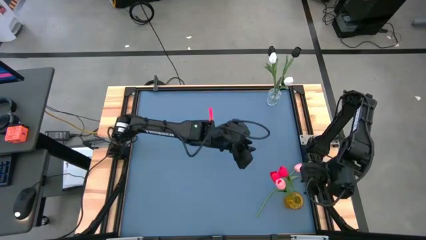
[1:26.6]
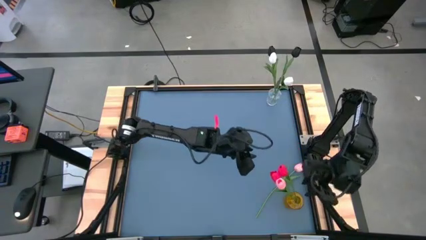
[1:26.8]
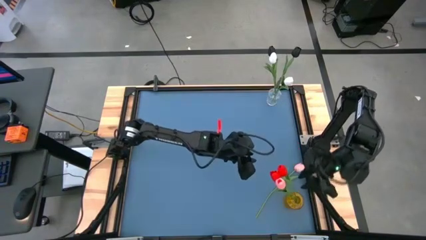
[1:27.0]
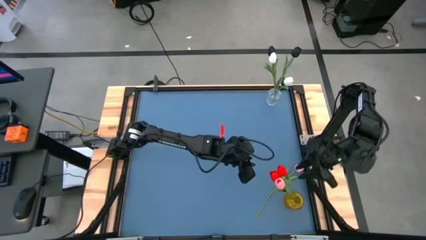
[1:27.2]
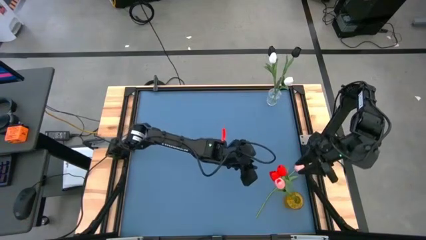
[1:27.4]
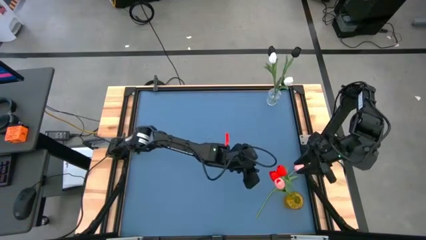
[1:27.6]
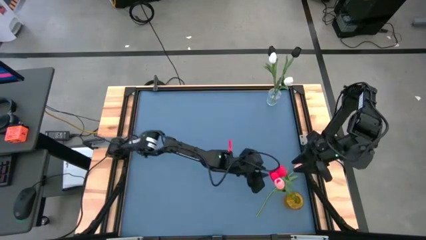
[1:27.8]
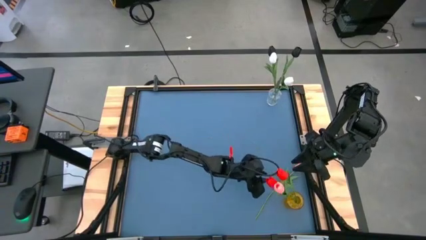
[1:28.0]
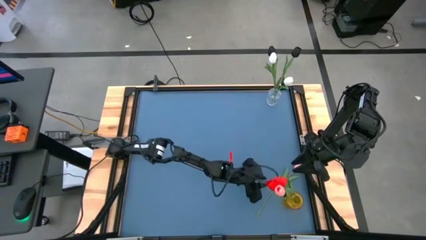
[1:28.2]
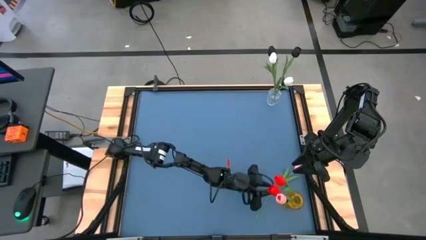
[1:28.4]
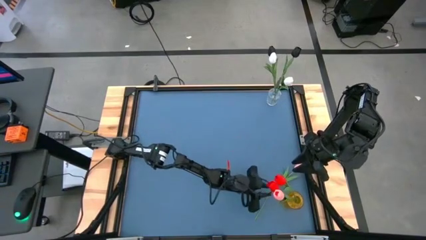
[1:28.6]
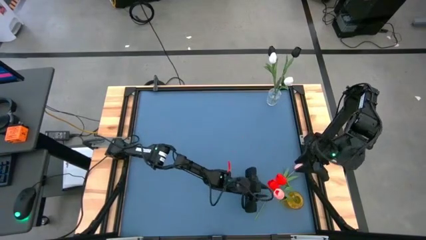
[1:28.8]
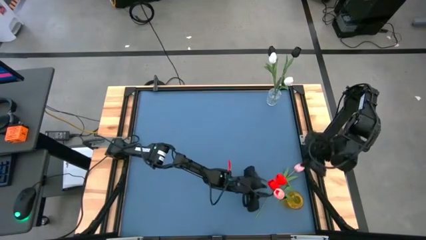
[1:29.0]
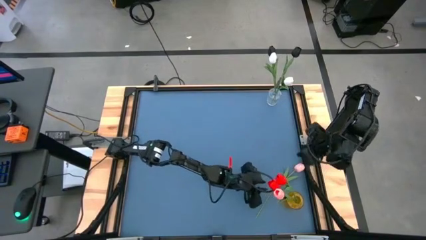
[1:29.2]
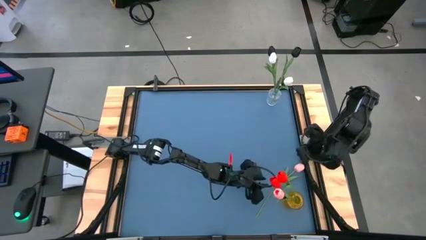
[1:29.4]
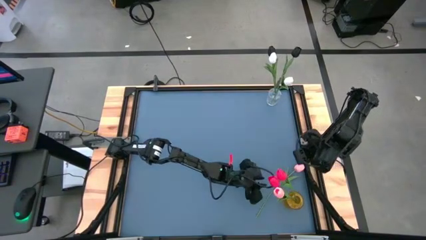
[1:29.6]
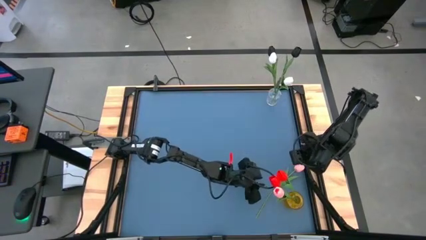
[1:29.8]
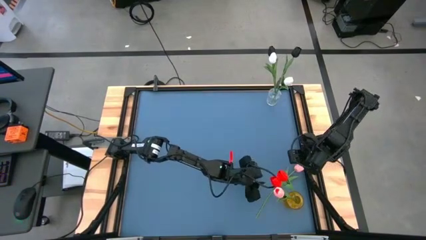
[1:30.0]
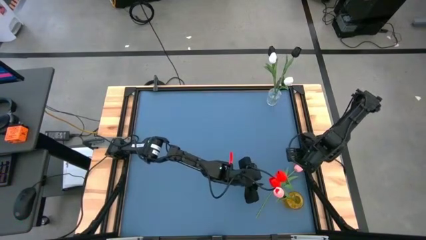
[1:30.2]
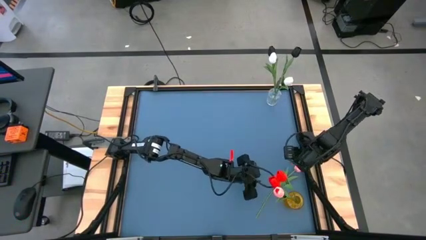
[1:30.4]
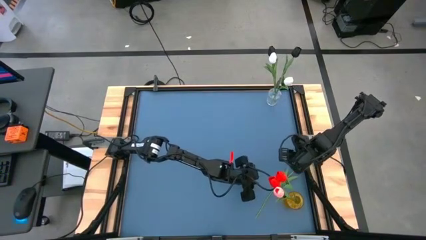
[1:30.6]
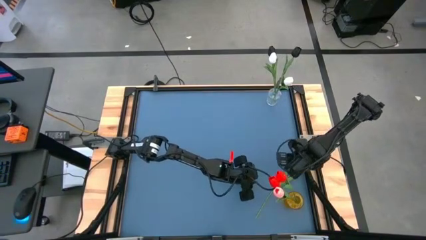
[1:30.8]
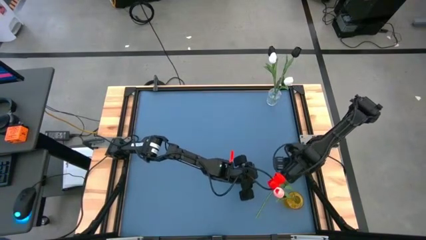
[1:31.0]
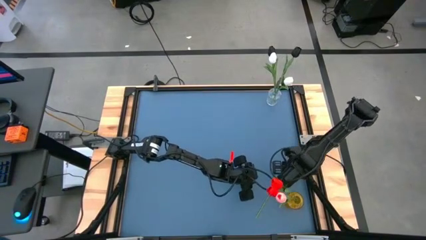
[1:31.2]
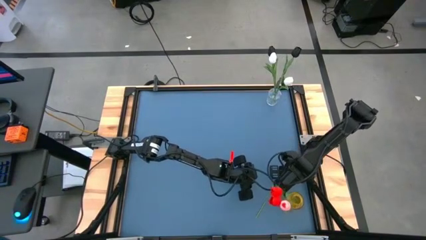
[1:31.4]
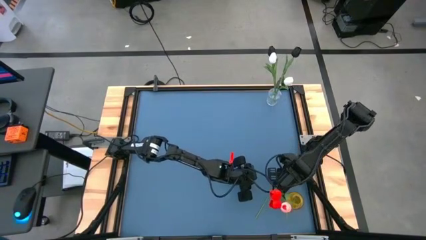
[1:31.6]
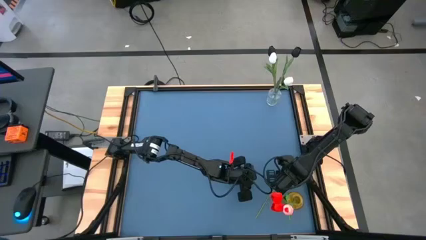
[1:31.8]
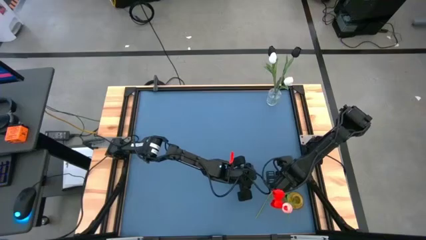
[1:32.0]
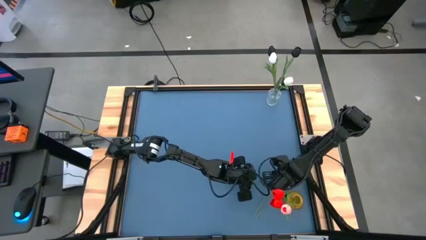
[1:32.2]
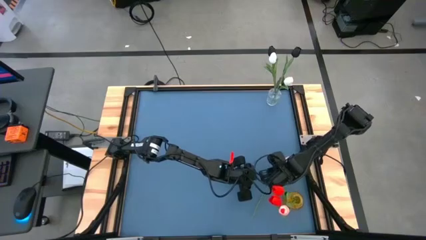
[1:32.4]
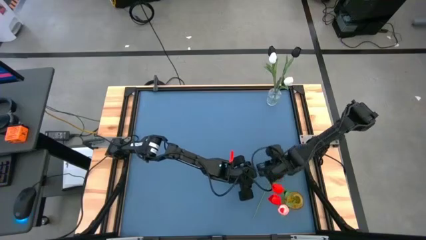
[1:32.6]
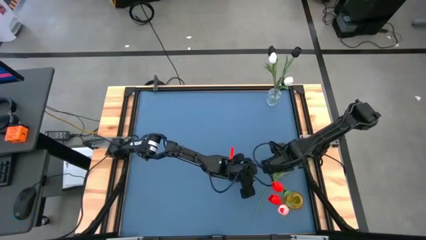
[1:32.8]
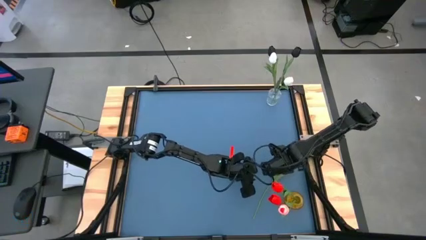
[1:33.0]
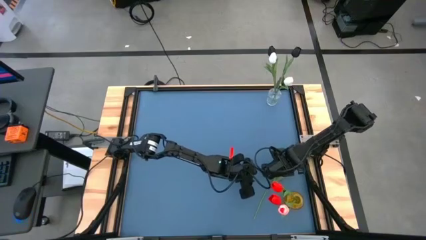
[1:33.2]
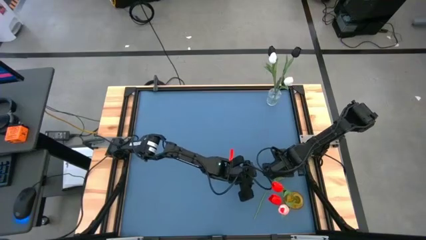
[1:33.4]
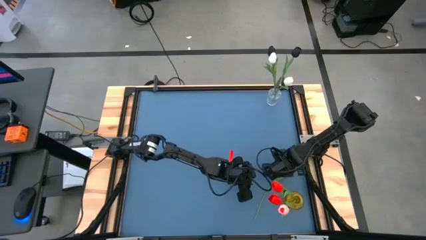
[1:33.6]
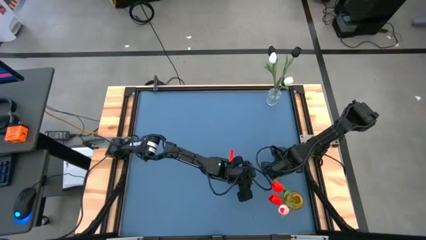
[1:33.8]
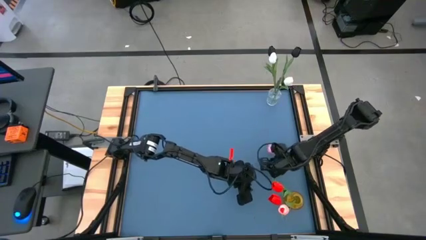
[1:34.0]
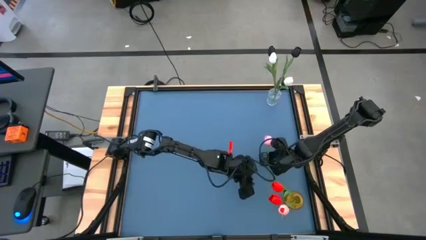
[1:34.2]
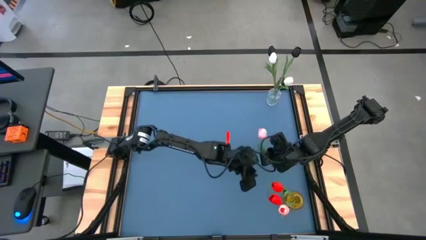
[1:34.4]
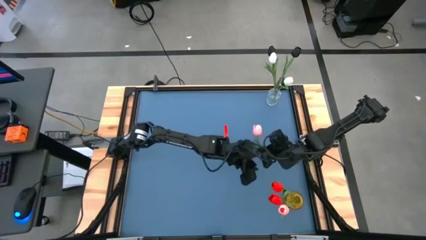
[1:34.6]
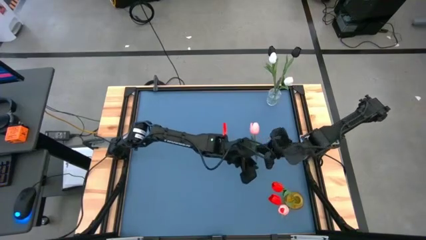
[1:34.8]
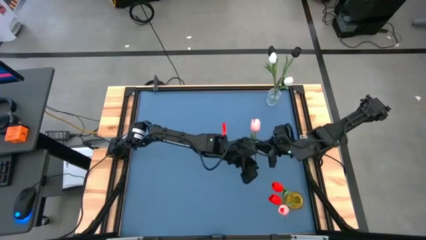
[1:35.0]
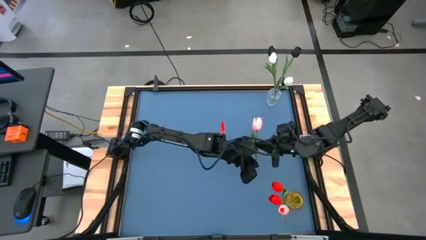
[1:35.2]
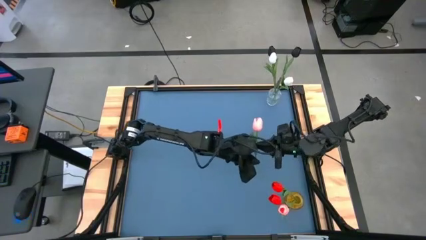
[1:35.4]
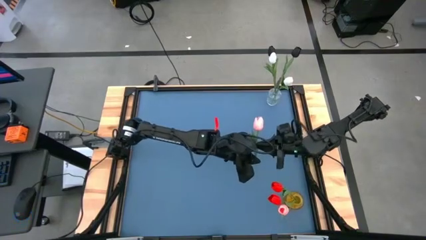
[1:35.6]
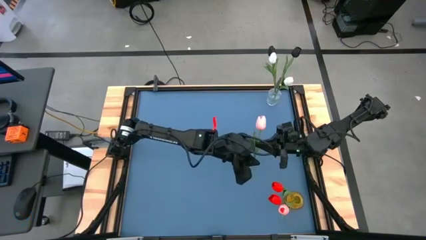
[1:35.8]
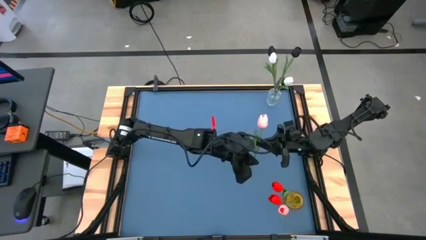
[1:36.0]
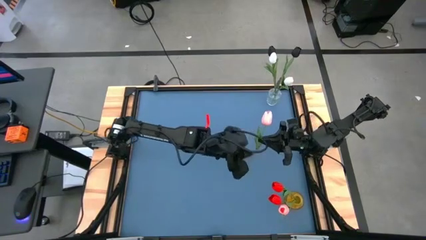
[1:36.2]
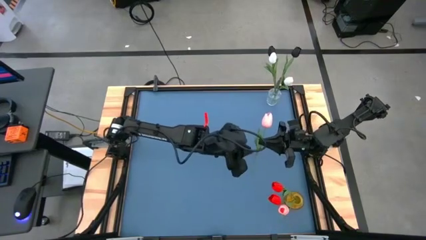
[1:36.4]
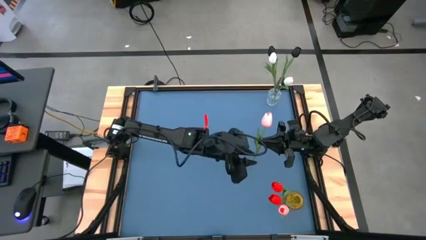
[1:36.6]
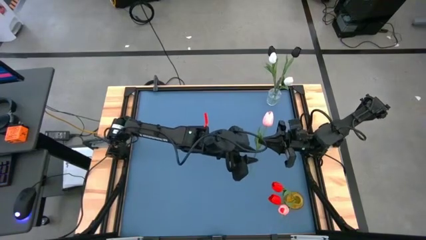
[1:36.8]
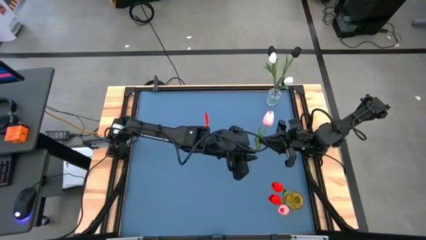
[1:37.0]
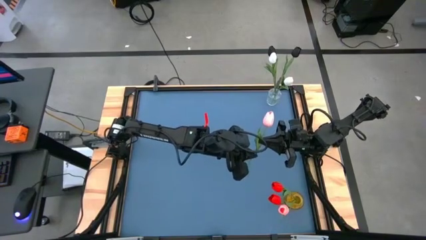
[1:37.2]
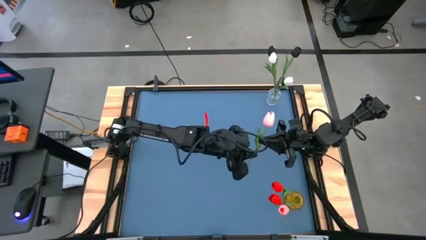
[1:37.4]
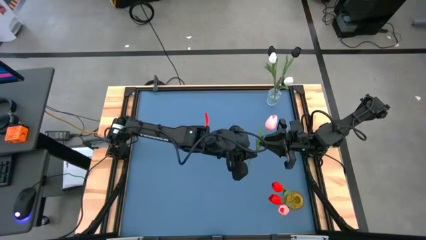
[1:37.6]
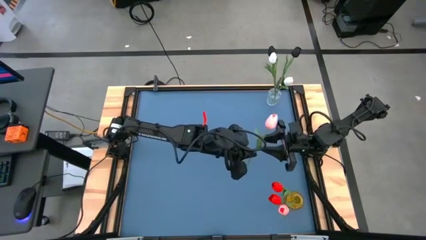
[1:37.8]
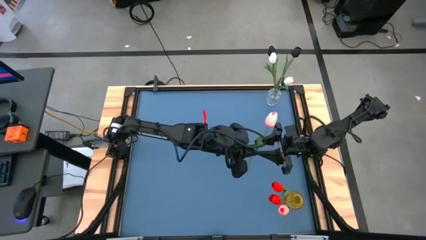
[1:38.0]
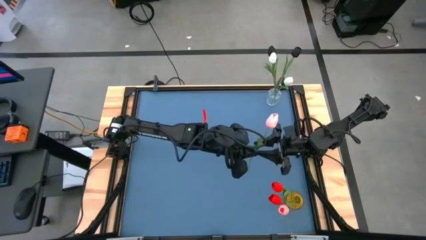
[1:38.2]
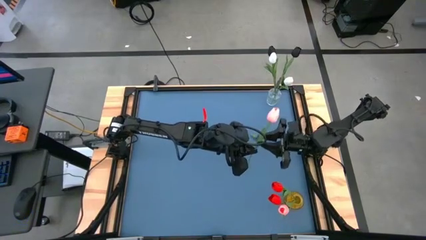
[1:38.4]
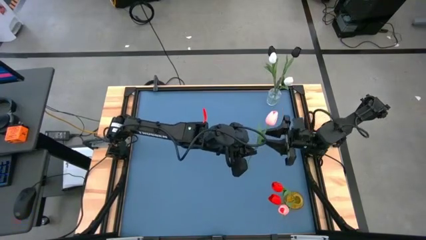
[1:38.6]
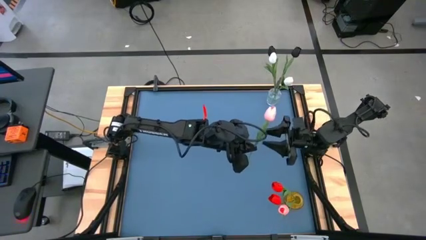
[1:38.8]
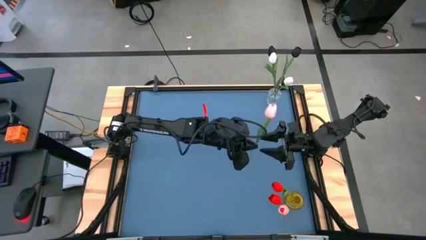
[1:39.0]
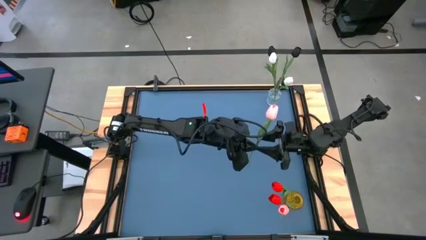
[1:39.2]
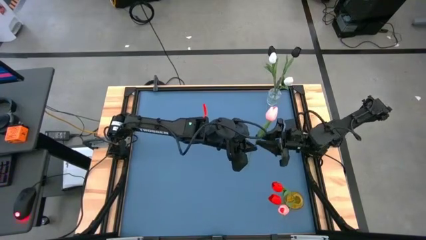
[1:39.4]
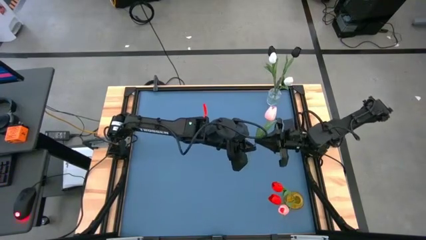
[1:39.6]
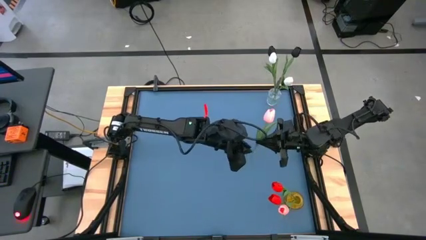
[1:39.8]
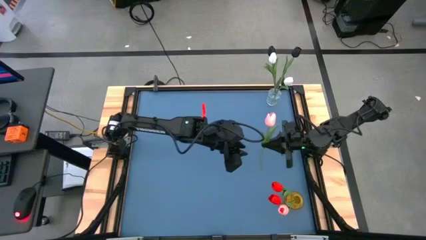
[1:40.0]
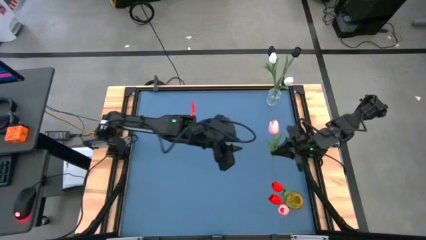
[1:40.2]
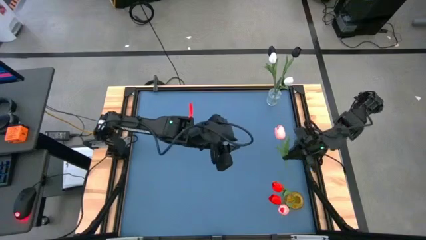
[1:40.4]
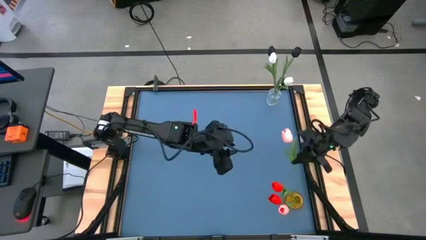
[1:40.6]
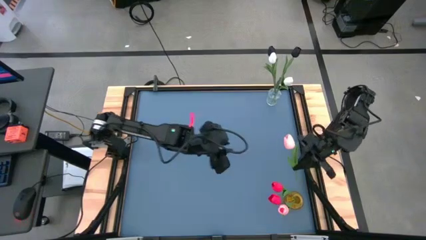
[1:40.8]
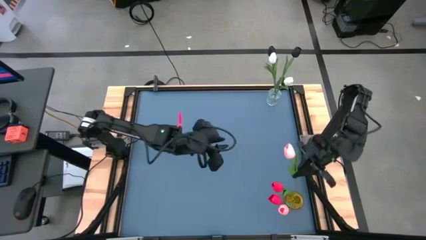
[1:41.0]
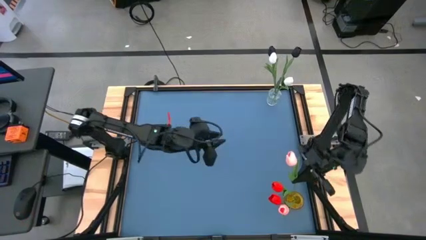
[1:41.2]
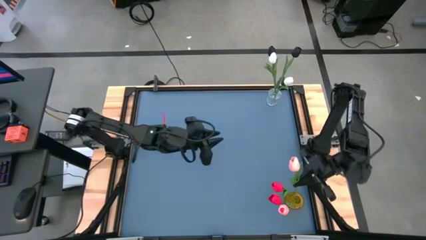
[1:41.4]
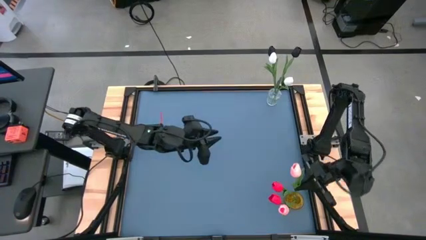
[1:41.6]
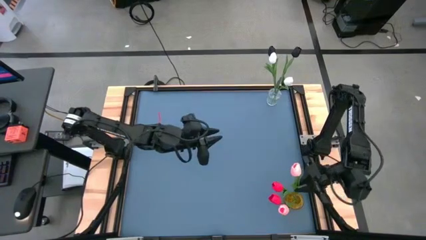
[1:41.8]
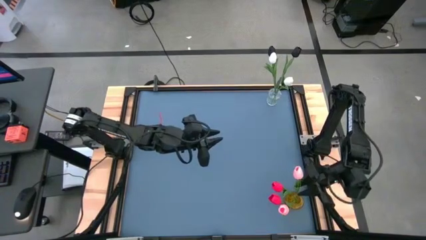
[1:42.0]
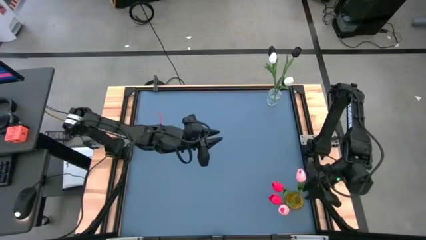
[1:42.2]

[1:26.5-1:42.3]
Task: Sort flowers into vase by color
Put the pink flower into the yellow vase
